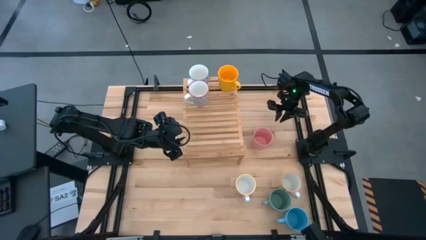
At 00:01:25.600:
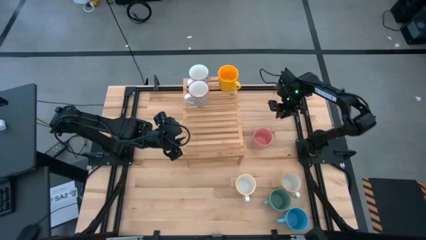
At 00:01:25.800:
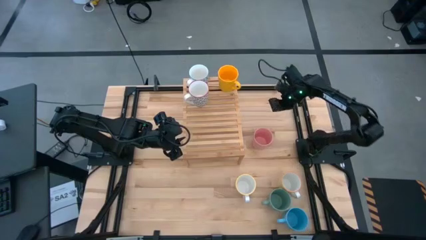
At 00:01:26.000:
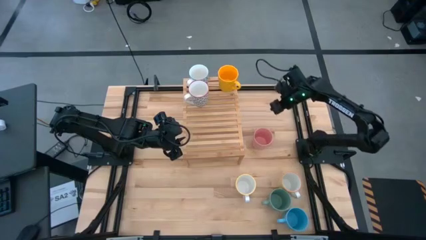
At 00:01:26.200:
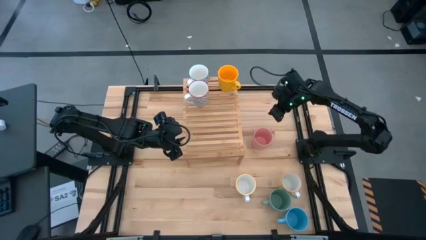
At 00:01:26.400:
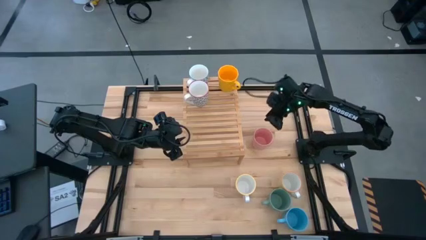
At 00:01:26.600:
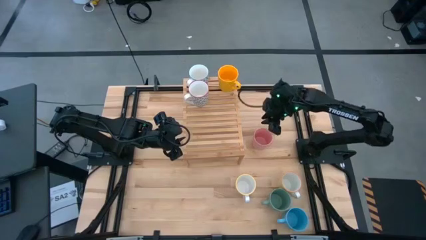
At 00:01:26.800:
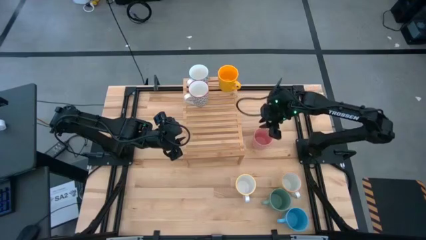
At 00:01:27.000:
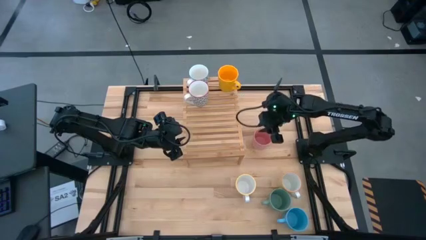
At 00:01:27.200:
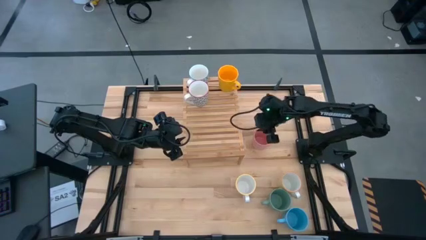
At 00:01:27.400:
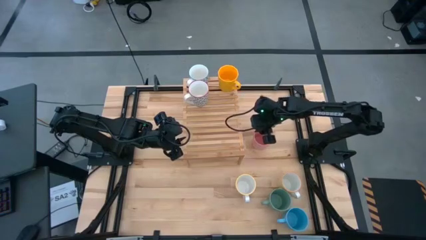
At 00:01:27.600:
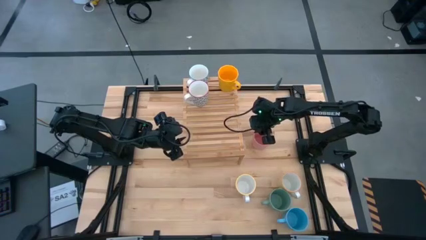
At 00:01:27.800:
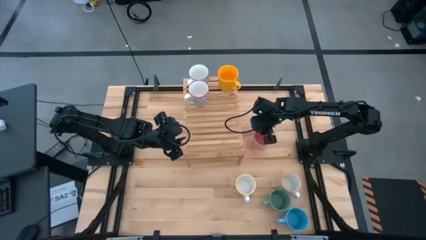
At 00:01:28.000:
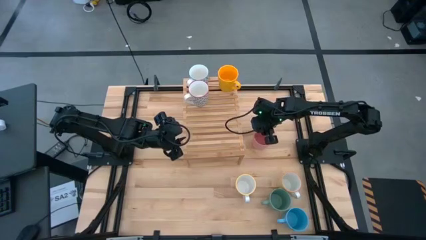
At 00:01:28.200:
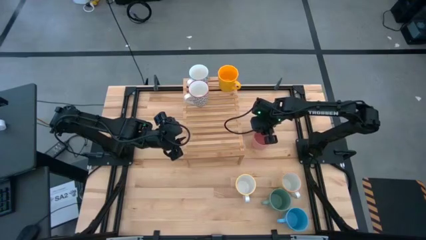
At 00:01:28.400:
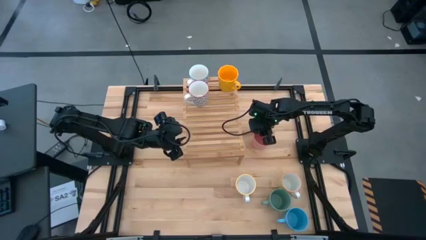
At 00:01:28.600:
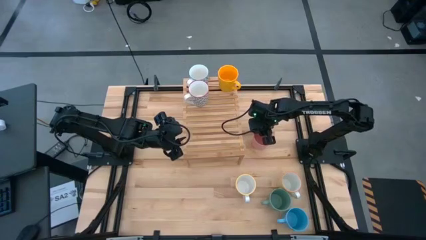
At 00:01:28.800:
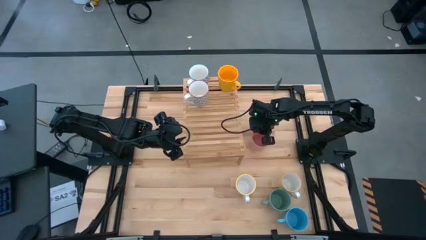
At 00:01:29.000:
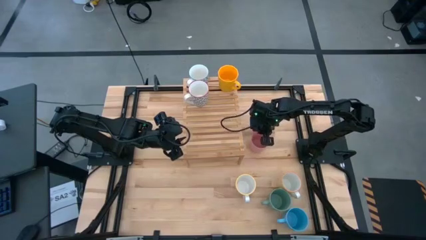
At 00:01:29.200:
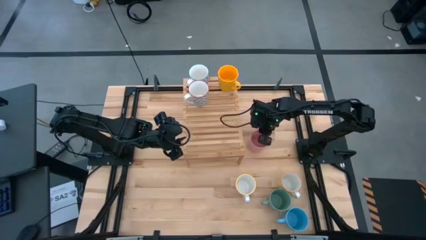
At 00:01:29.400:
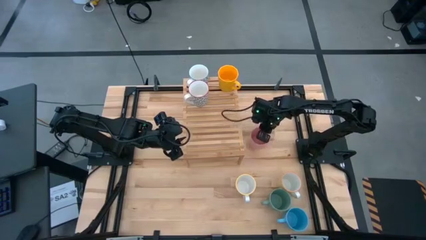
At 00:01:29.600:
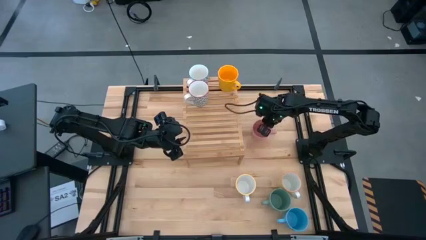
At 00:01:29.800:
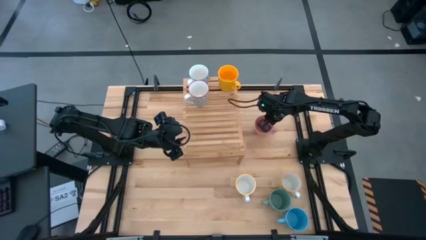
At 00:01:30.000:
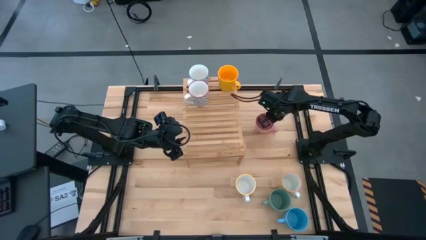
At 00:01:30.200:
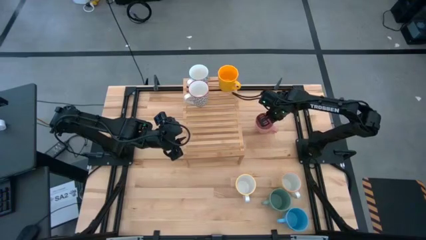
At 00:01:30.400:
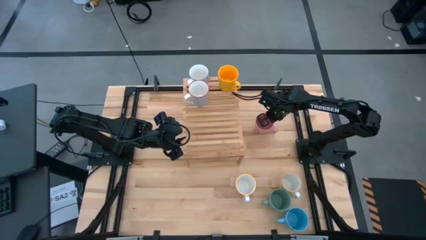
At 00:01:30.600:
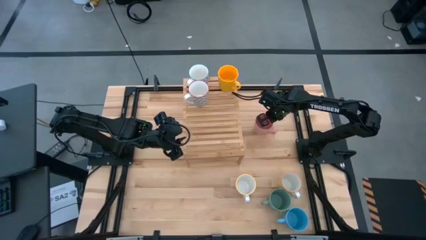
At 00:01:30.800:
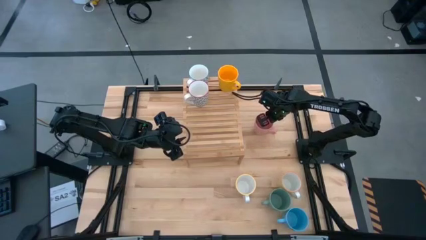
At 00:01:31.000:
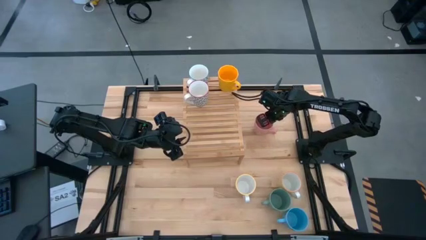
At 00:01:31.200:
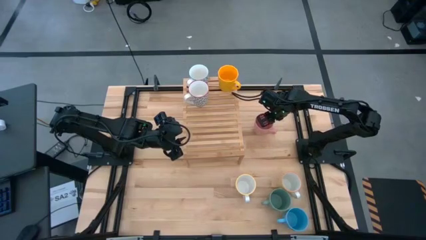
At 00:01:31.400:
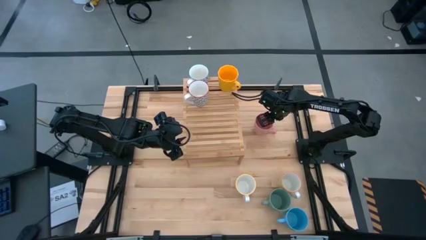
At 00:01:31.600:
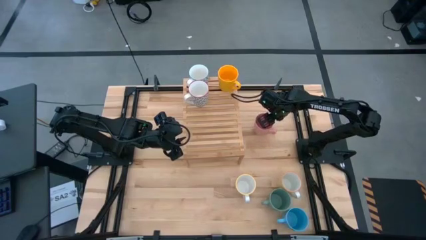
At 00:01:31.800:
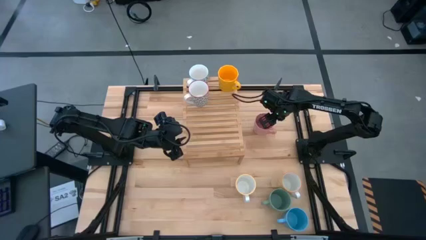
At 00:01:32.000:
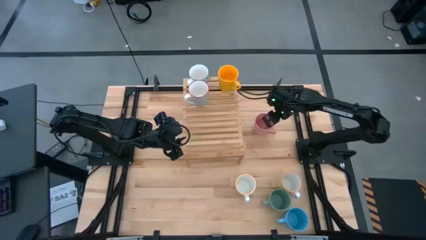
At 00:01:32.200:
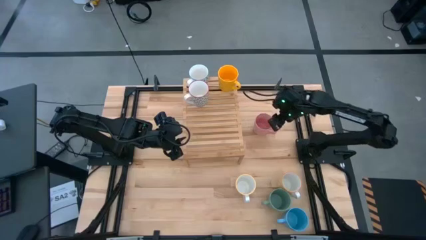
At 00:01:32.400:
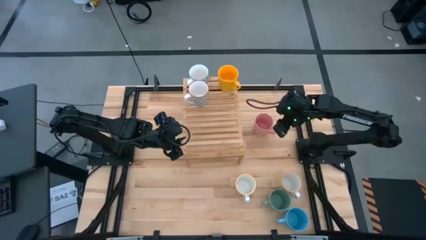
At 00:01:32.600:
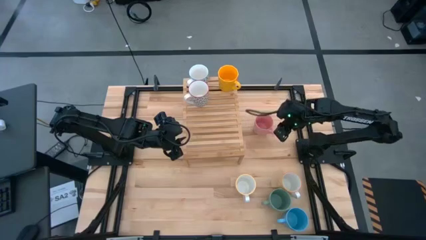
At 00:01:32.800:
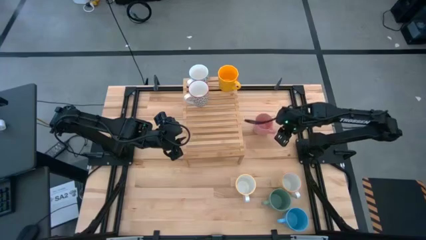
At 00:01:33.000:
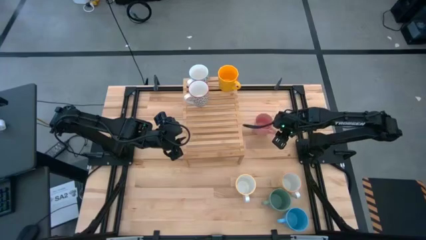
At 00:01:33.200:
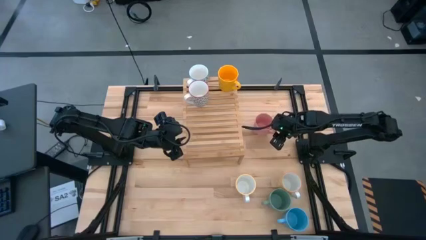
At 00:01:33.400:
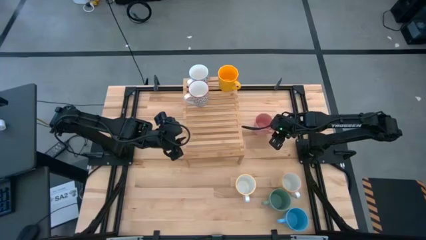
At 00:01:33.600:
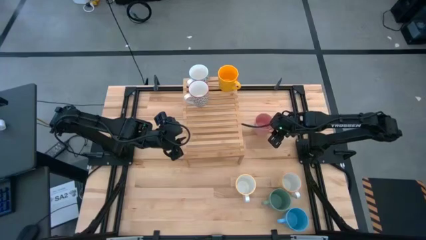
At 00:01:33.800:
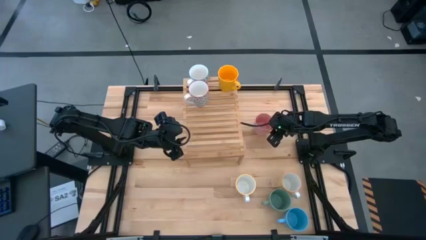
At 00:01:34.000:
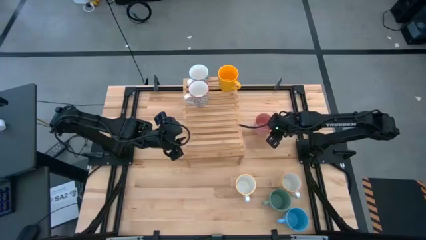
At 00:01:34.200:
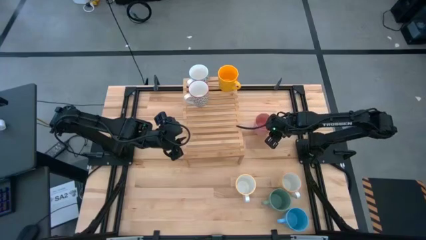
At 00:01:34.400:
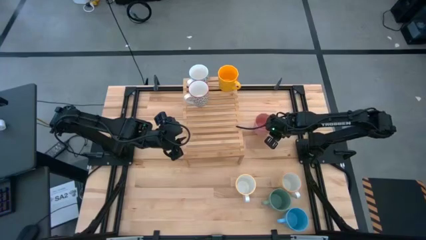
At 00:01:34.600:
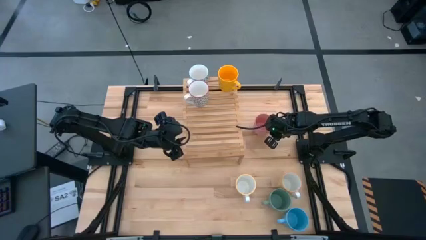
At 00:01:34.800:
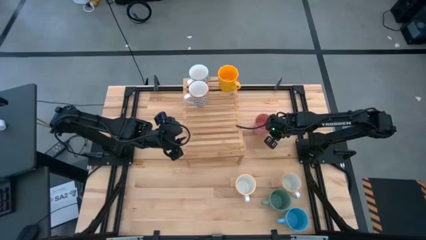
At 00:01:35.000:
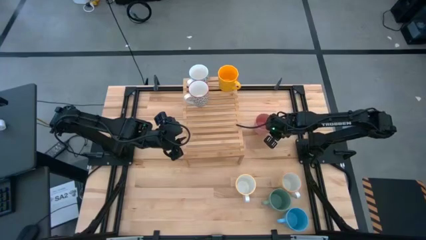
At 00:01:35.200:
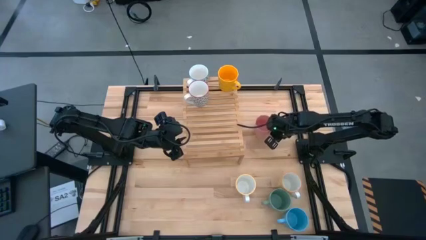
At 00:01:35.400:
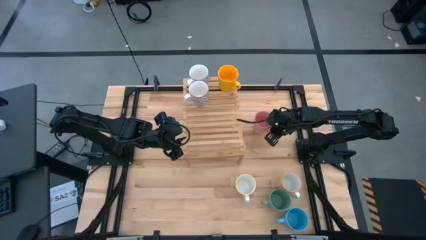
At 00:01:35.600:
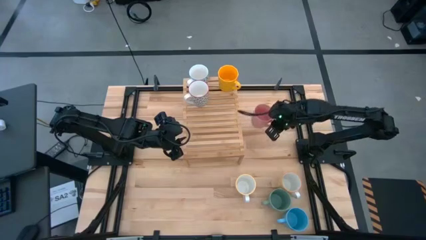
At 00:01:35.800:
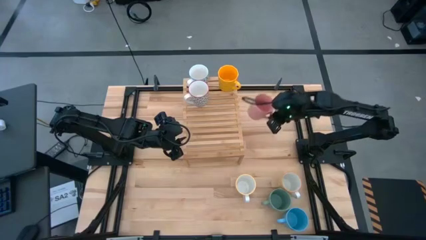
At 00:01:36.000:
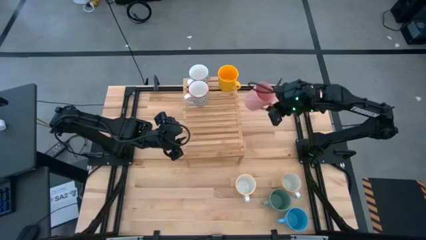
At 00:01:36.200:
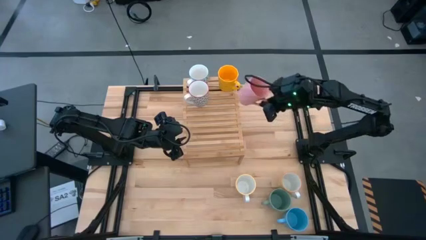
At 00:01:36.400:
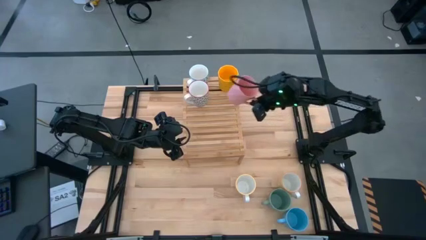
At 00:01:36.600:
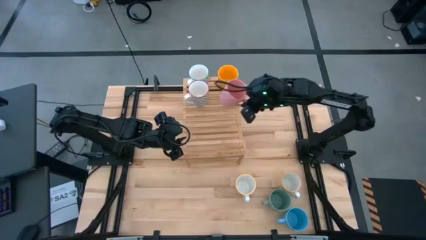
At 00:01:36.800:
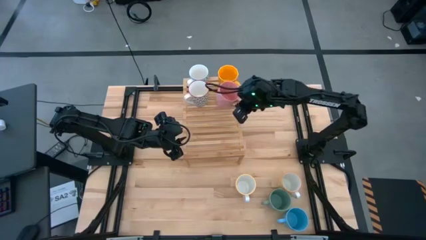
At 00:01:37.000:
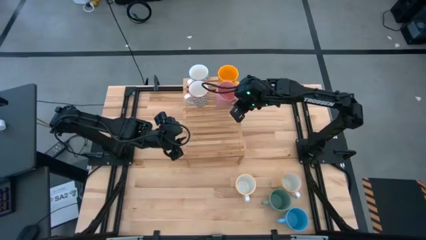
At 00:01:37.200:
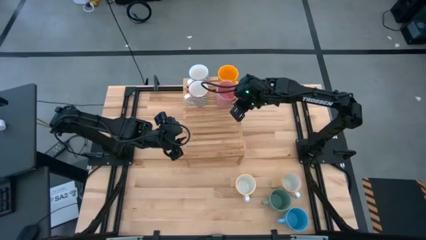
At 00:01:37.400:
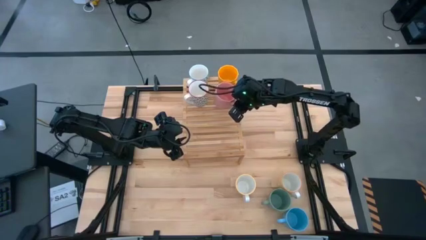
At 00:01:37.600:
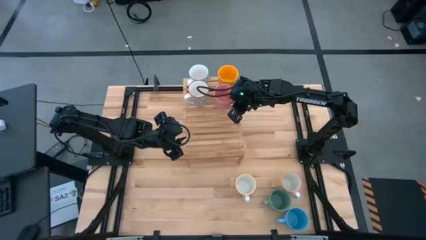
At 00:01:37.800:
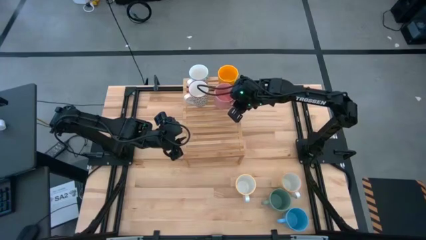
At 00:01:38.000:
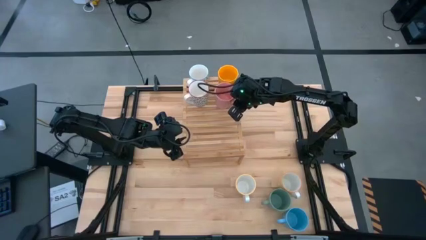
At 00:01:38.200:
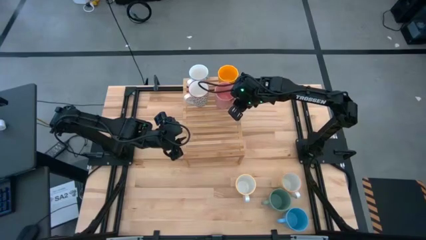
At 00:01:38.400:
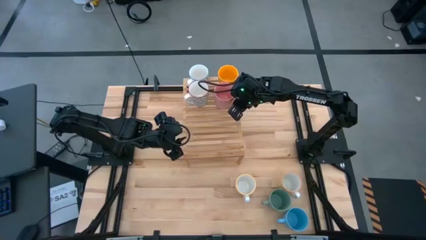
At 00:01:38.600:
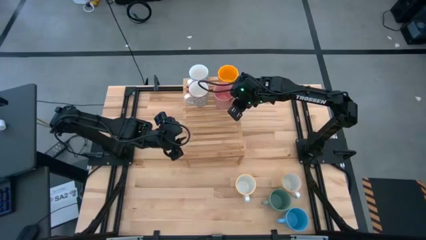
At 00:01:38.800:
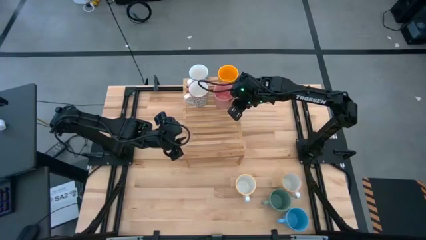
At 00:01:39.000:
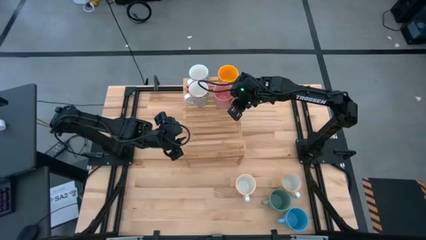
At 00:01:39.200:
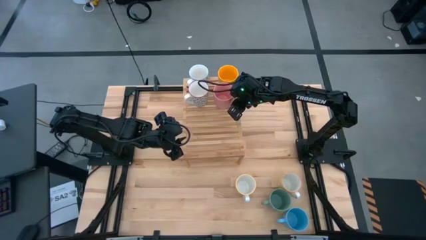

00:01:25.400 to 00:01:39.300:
Task: Place coffee mugs
Put the pink cup on the shelf aligned with the other yellow cup

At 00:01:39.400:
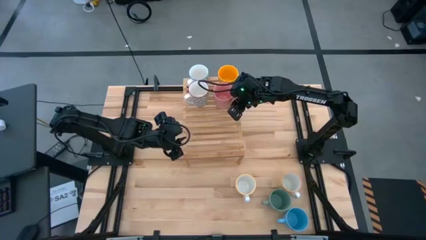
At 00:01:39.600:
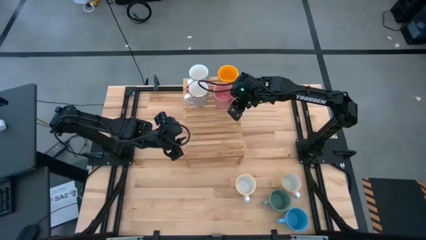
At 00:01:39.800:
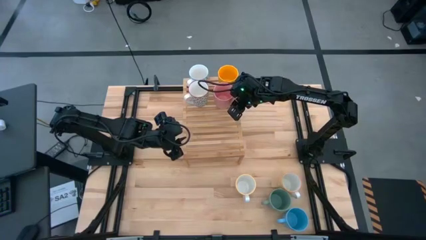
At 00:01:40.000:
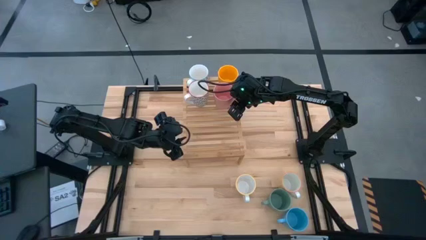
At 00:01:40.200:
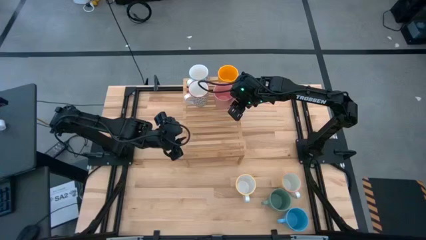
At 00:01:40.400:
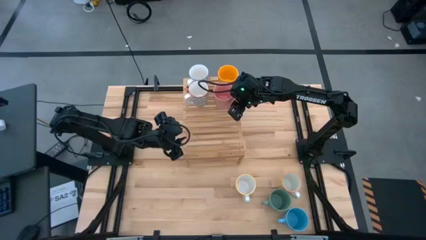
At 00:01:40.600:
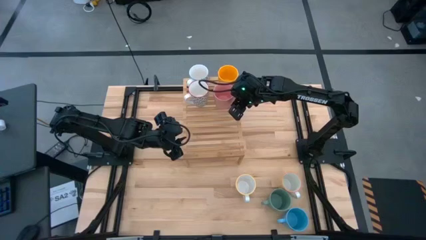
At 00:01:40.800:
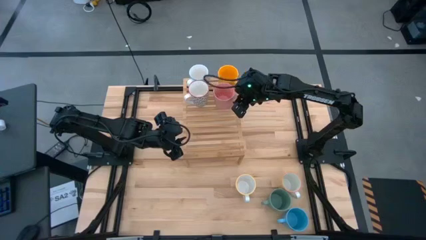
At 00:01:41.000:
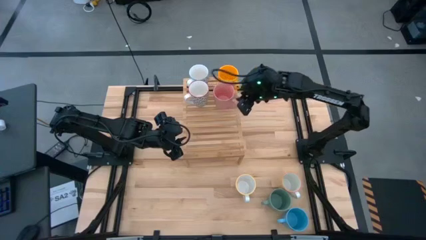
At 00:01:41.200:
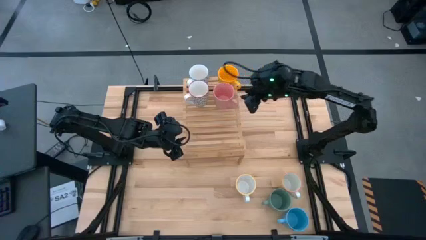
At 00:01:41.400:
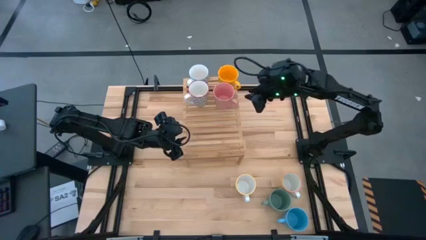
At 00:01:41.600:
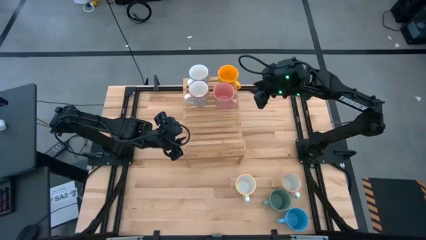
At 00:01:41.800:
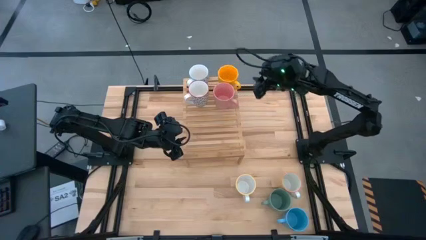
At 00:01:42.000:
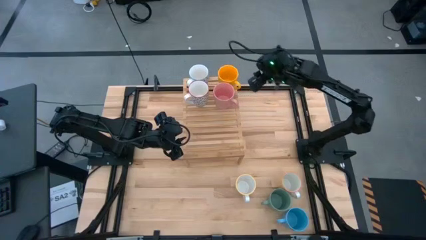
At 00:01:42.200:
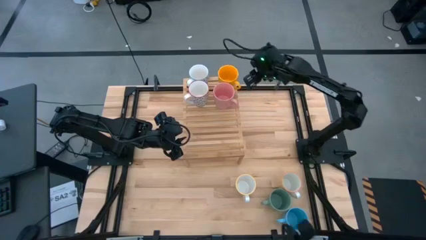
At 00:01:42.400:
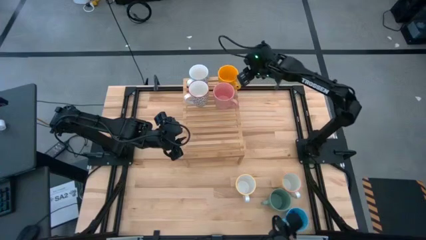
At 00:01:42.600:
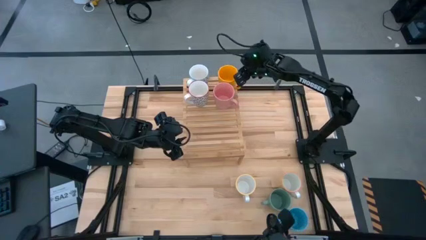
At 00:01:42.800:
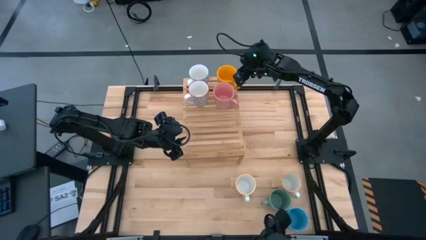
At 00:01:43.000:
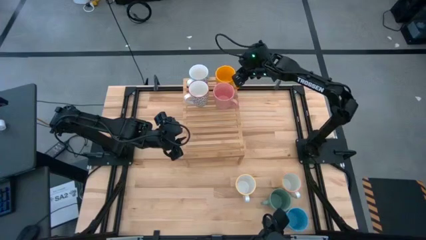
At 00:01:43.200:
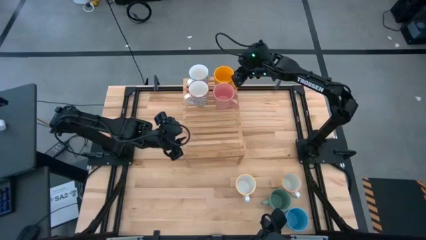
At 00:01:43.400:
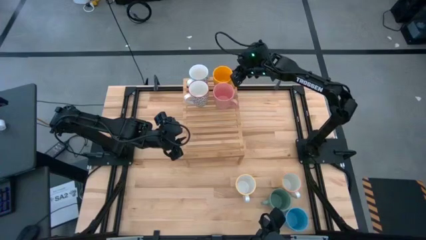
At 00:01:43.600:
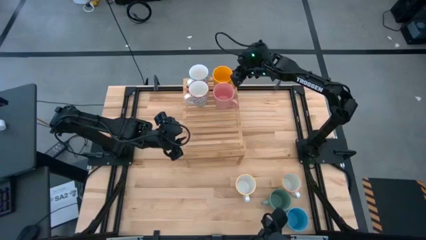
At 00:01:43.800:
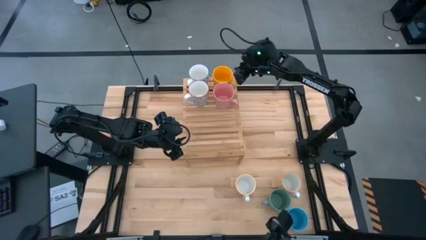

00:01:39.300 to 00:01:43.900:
Adjust the yellow cup on the shelf
